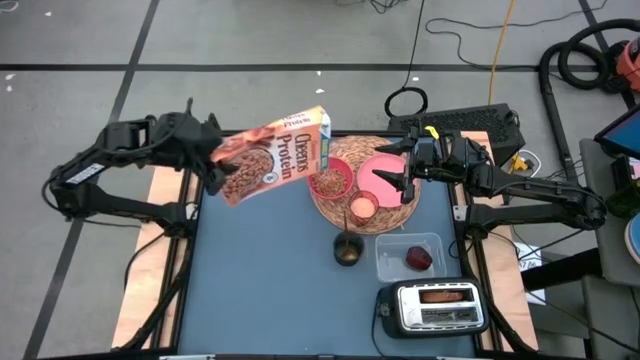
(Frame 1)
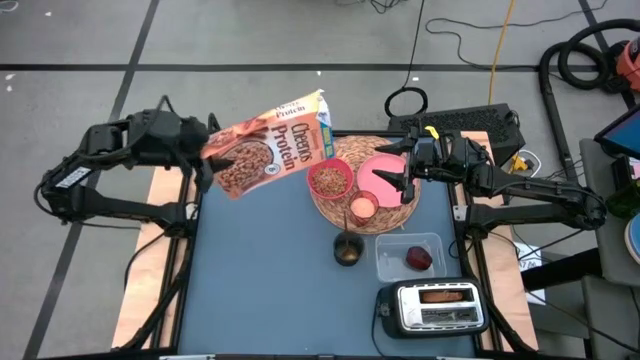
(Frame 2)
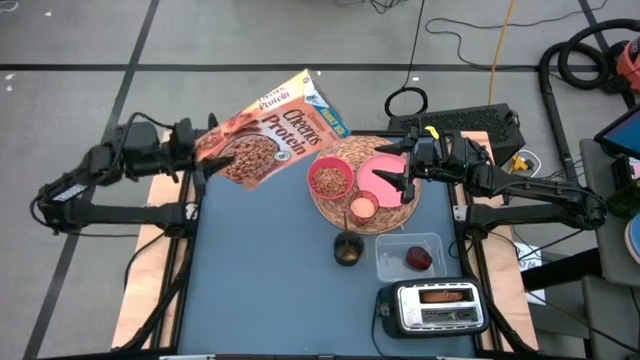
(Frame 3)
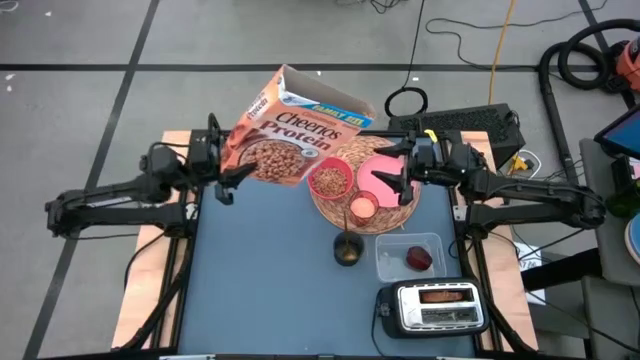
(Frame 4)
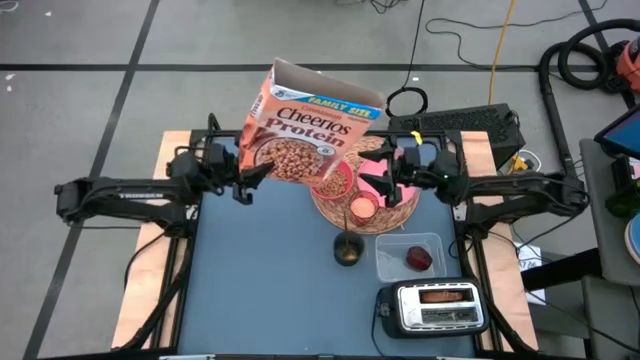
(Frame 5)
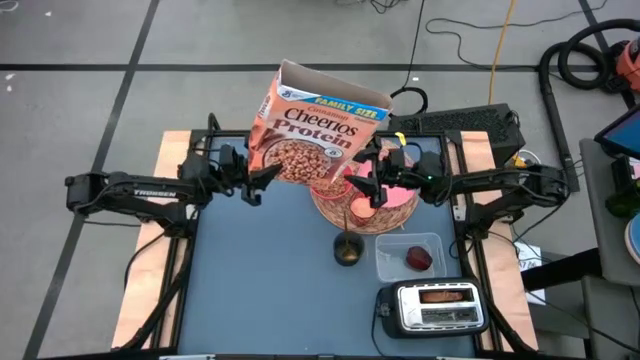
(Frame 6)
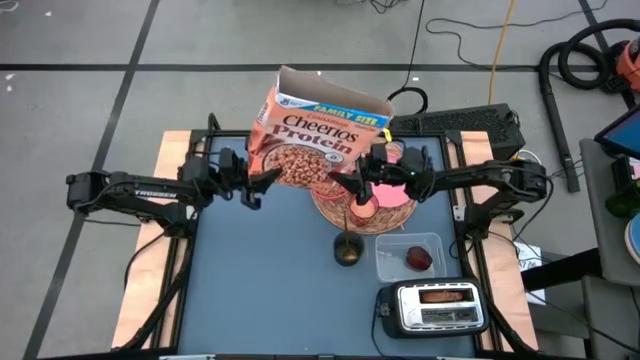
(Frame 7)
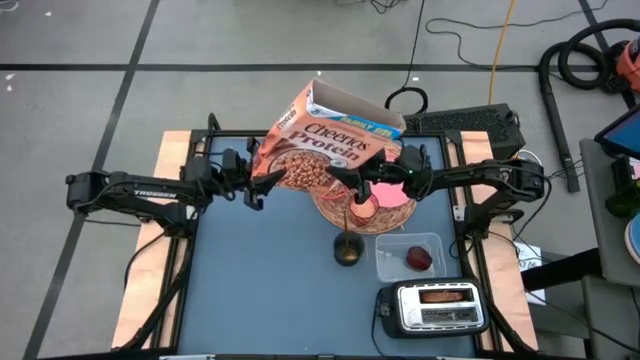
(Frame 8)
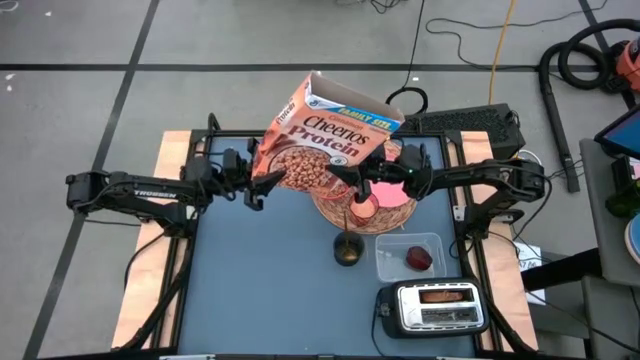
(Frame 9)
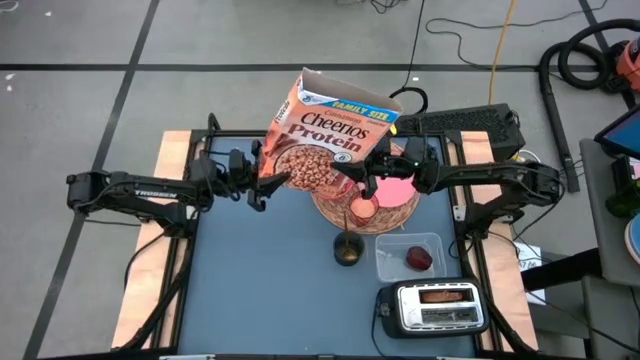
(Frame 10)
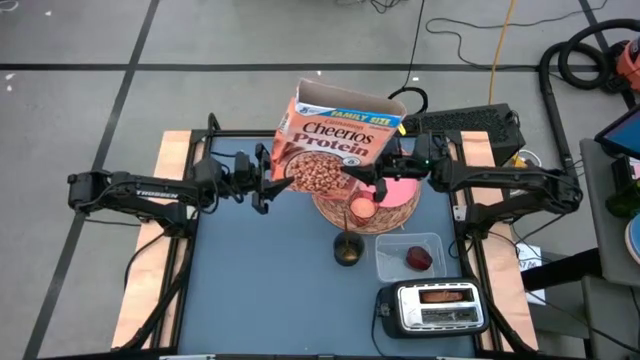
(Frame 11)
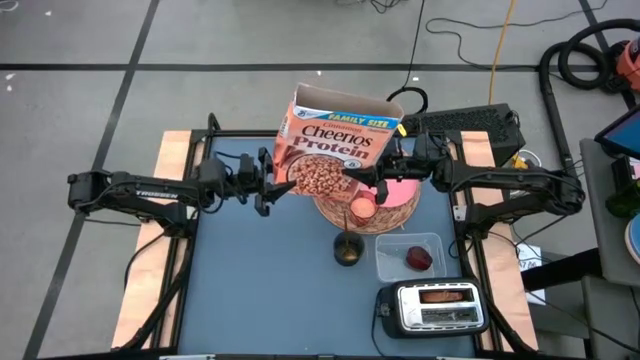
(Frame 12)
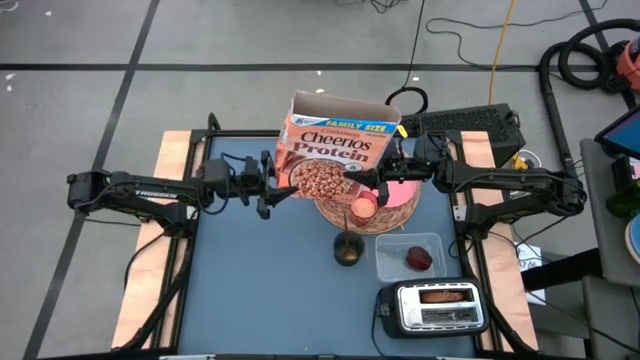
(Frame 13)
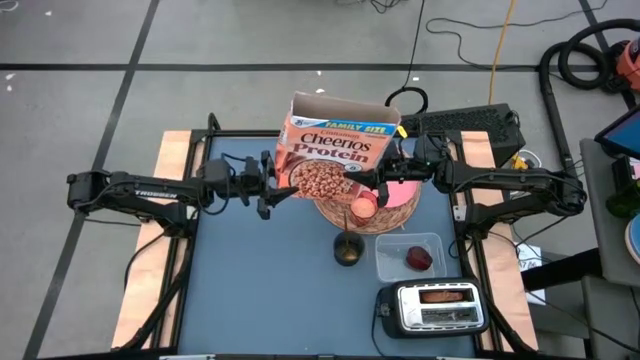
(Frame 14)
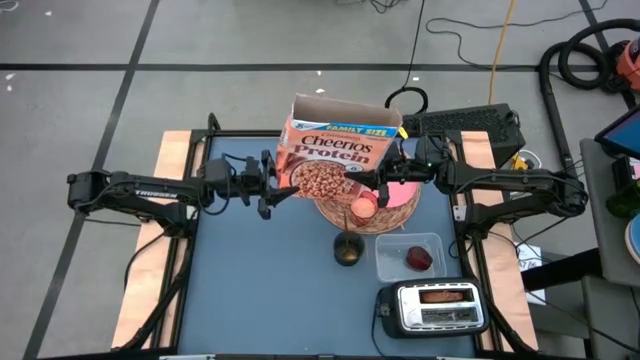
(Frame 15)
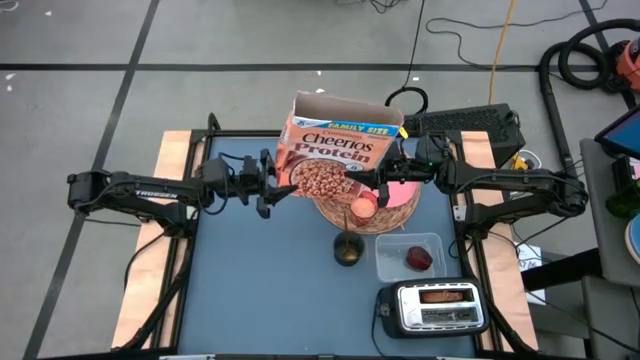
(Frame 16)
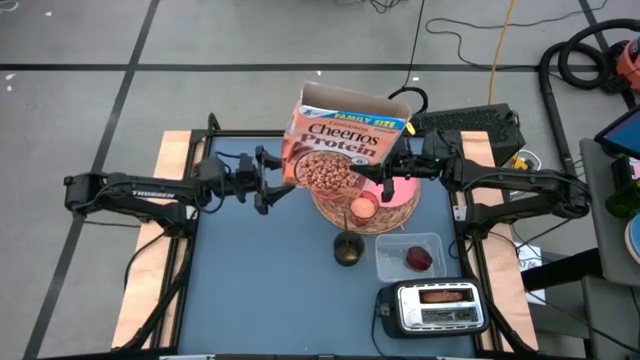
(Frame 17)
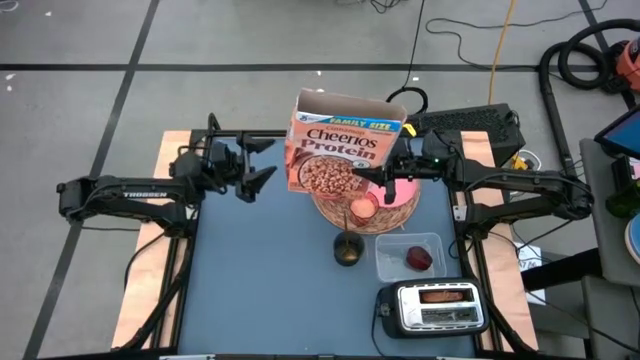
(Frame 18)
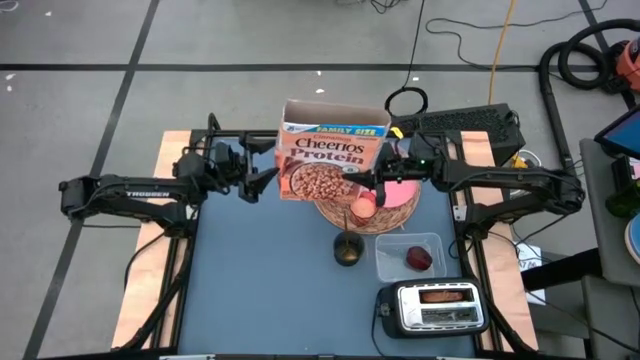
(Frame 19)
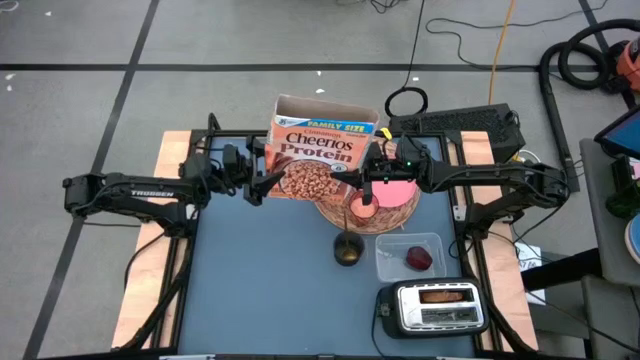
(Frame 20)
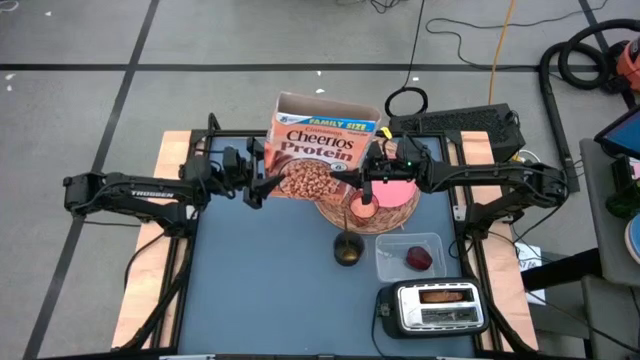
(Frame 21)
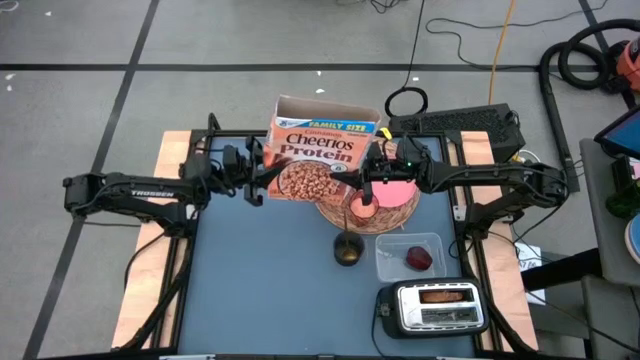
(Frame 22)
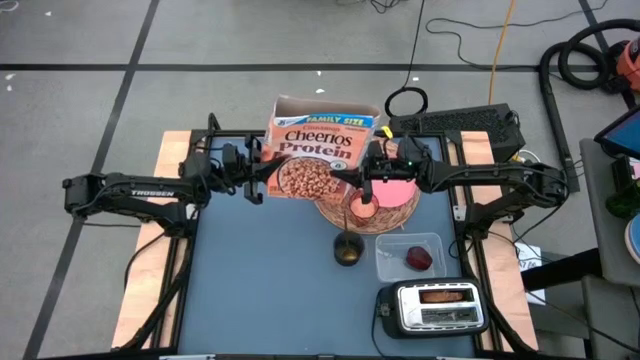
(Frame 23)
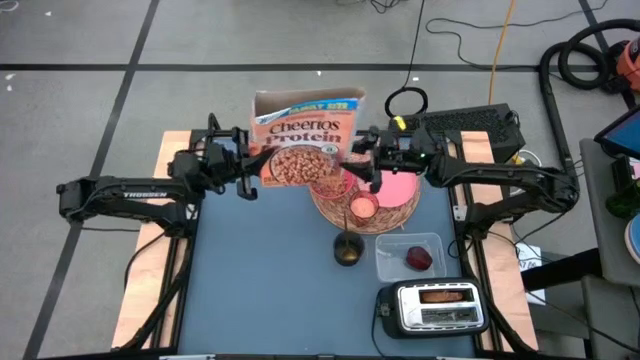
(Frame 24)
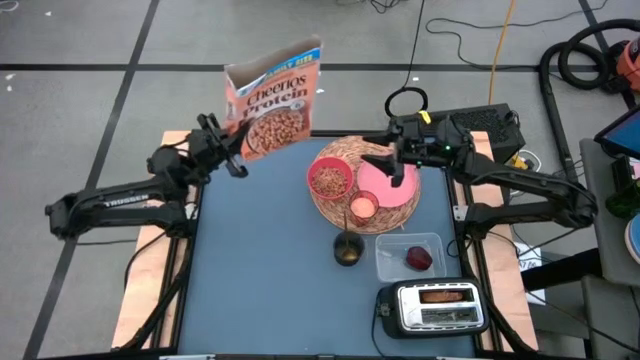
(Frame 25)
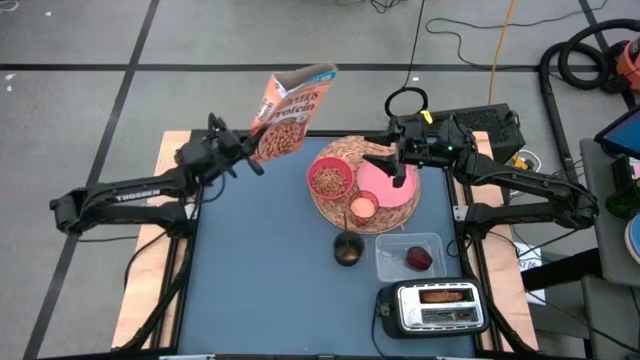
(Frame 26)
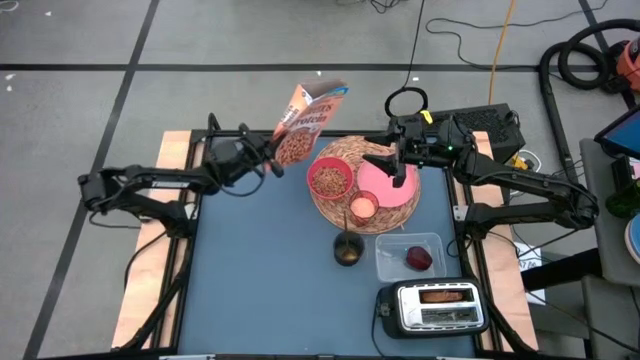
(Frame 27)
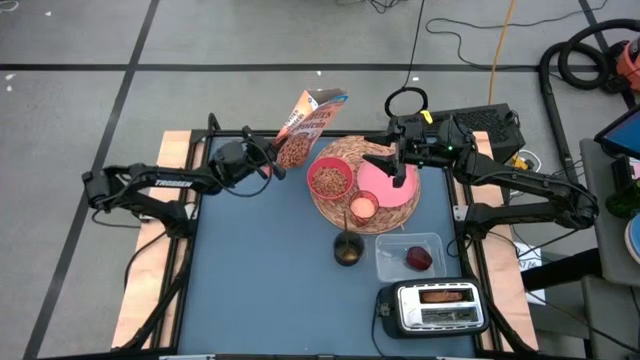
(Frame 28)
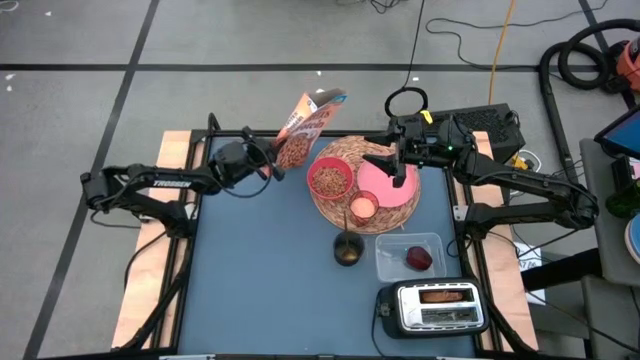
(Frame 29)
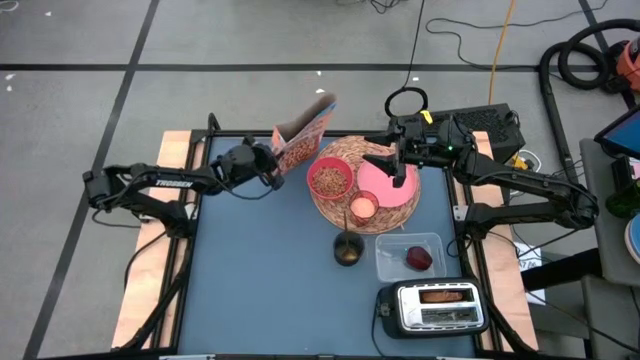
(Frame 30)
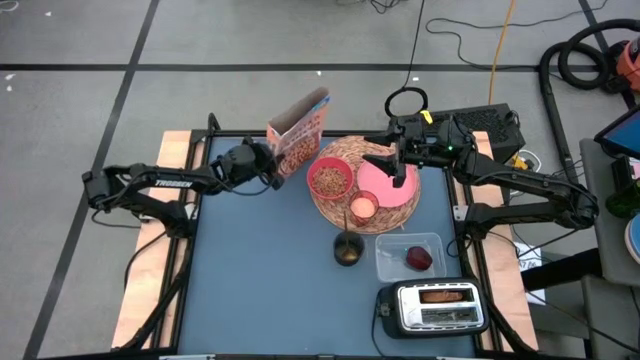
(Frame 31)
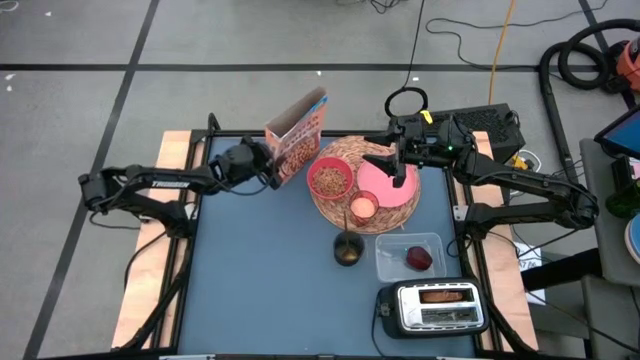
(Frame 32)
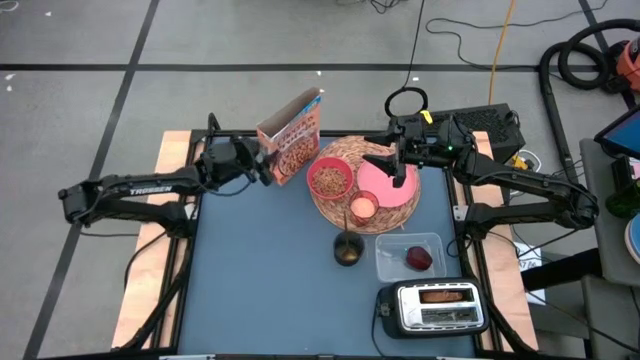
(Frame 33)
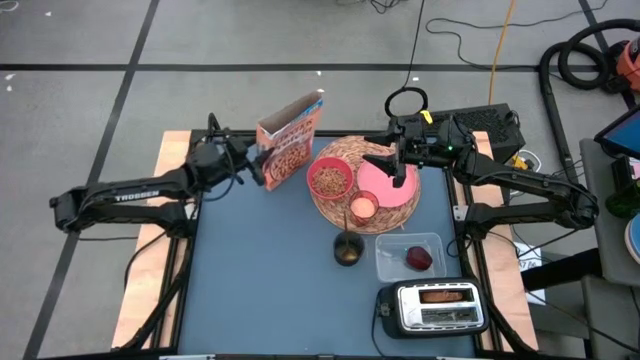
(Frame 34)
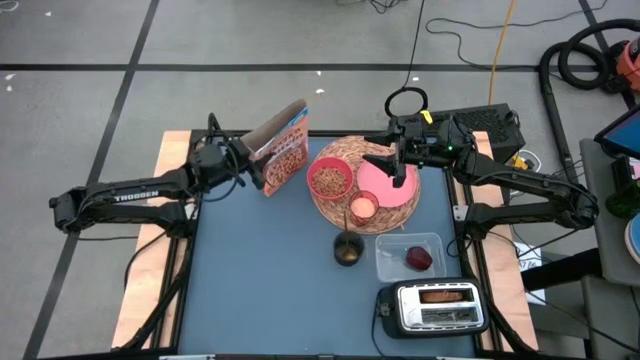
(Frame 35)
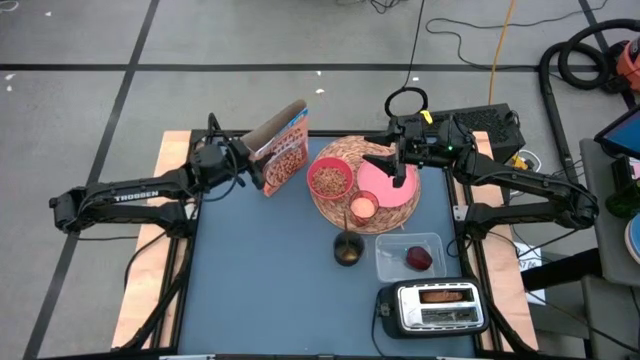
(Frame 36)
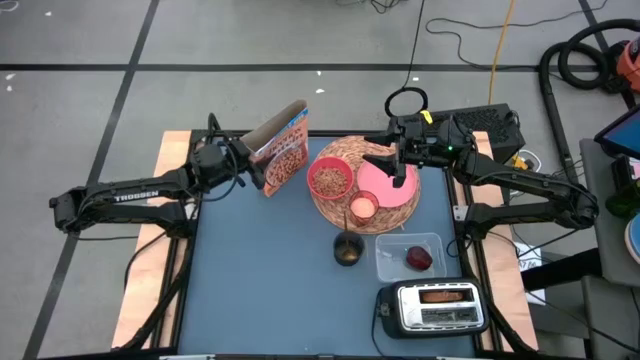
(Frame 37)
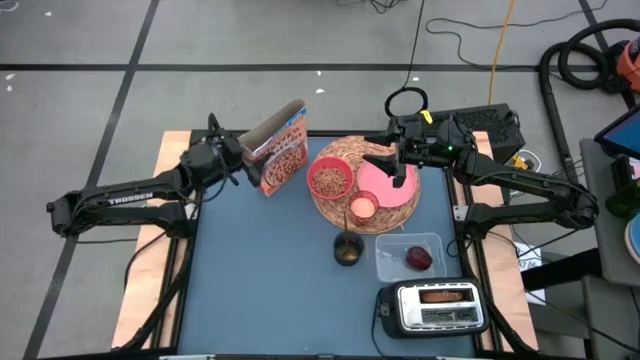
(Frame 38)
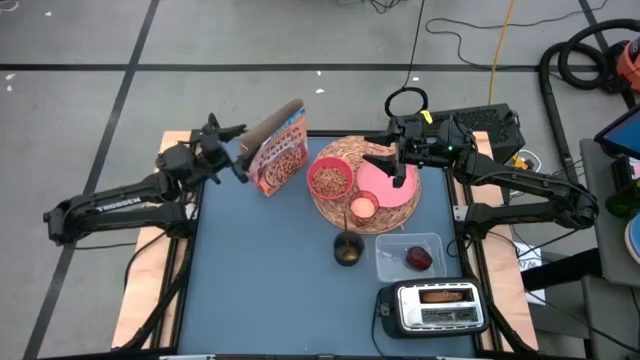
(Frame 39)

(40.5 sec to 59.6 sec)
Task: Arrange a breakfast setting
Pour the cereal from the cereal box into the red bowl
